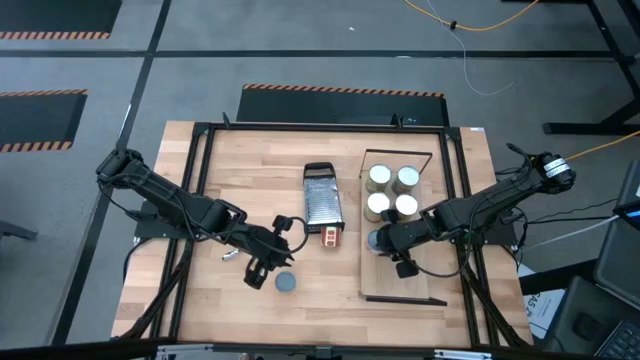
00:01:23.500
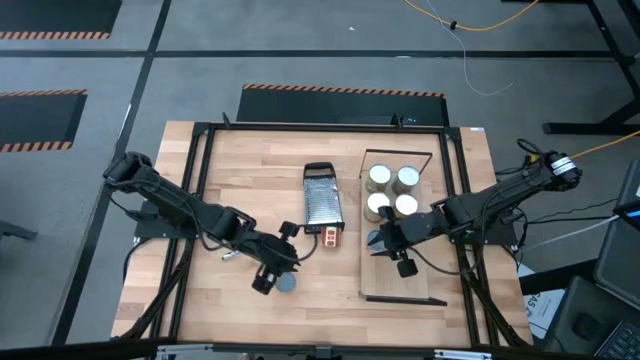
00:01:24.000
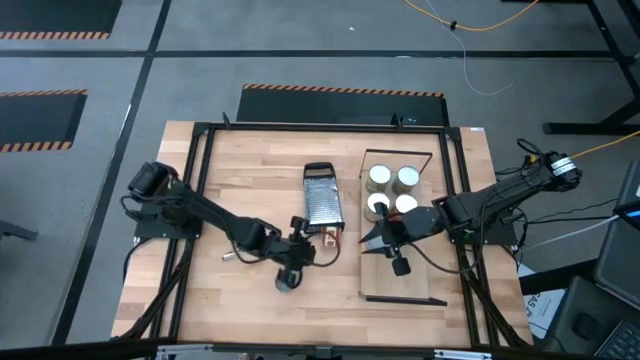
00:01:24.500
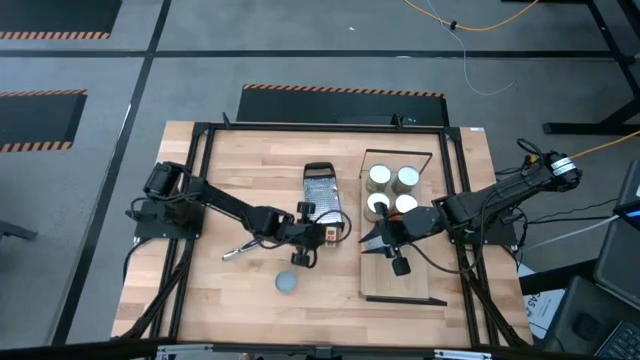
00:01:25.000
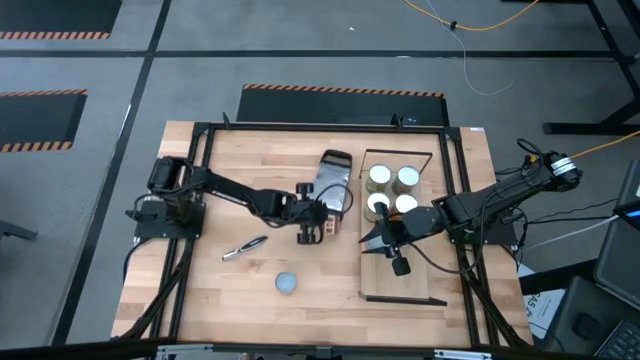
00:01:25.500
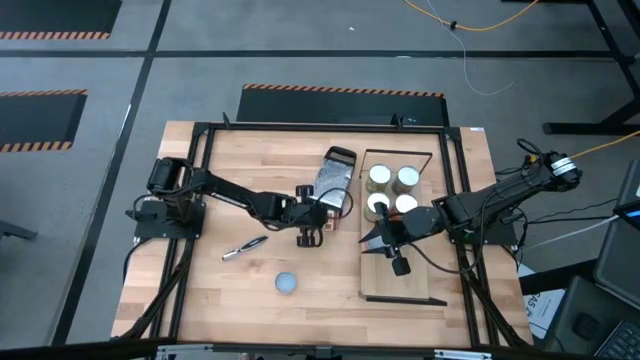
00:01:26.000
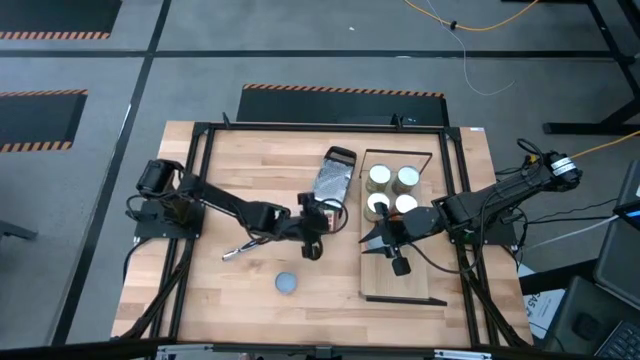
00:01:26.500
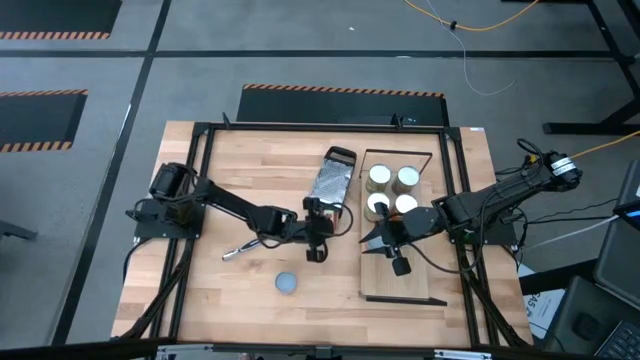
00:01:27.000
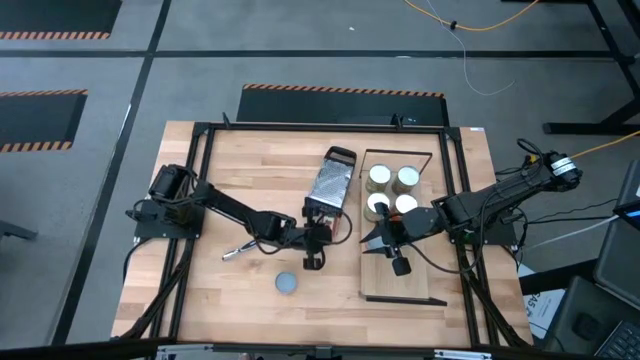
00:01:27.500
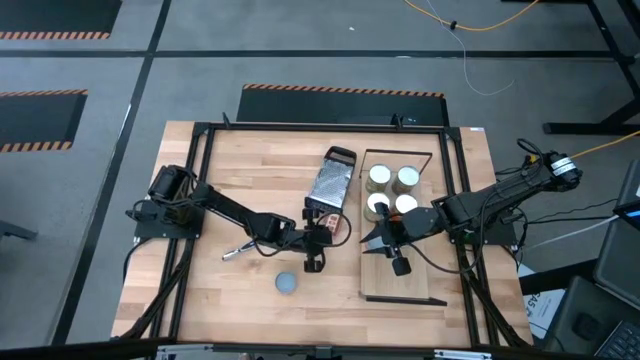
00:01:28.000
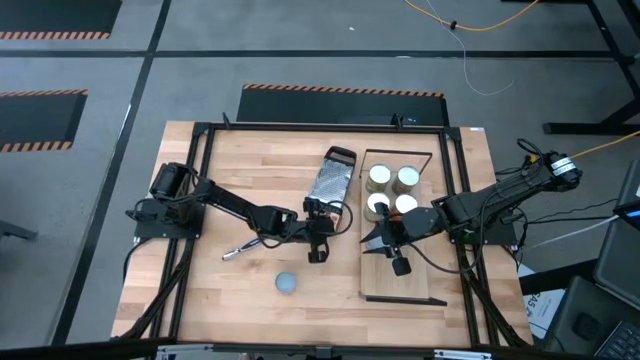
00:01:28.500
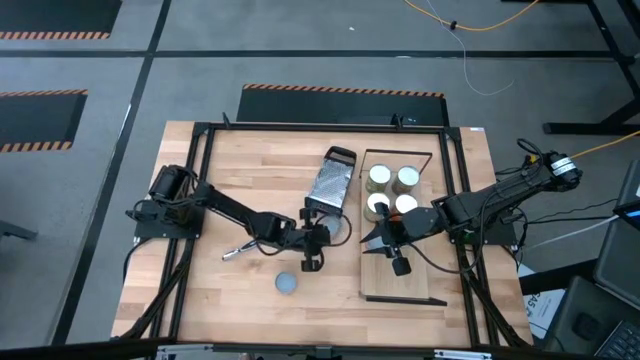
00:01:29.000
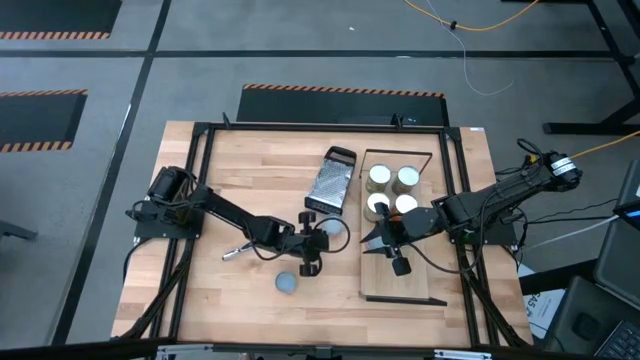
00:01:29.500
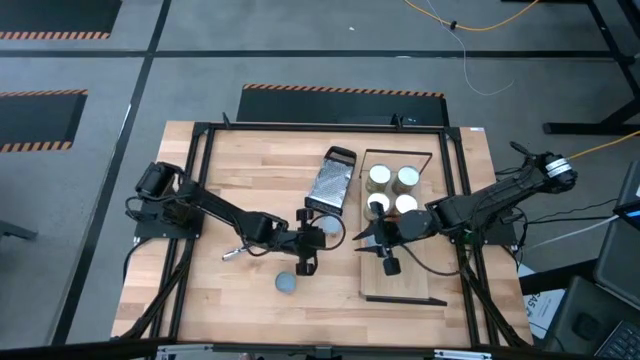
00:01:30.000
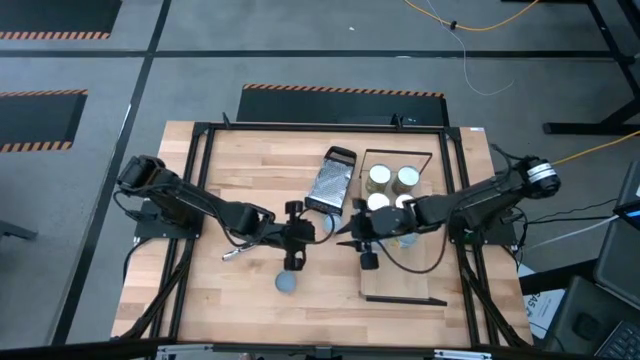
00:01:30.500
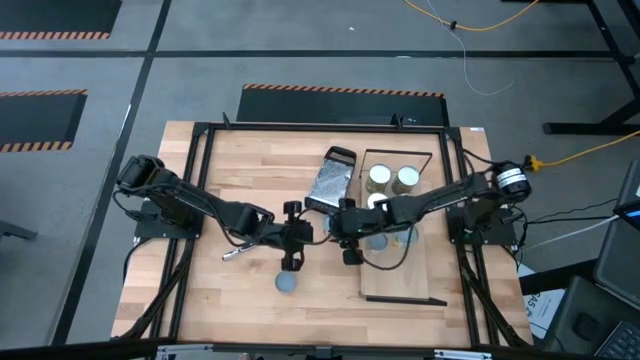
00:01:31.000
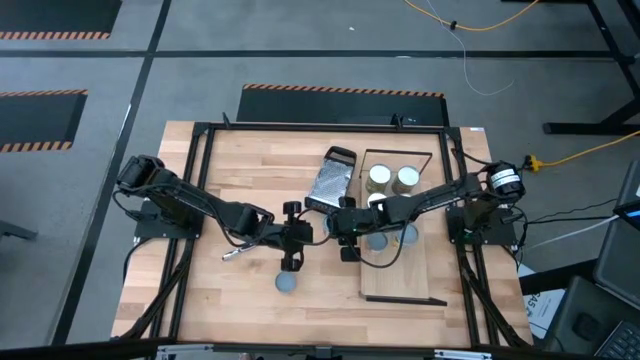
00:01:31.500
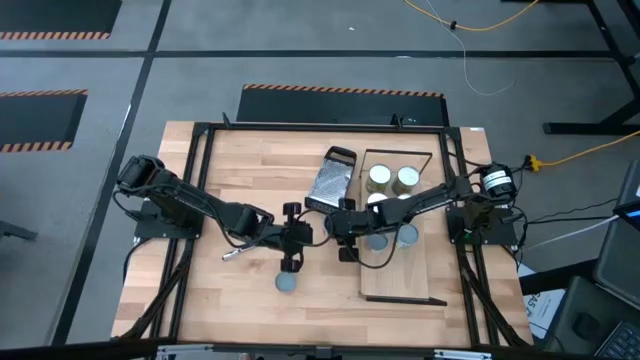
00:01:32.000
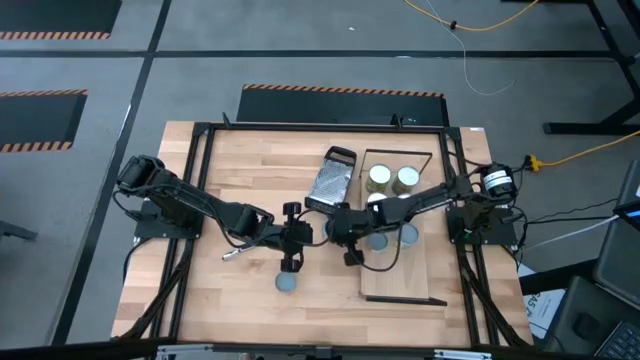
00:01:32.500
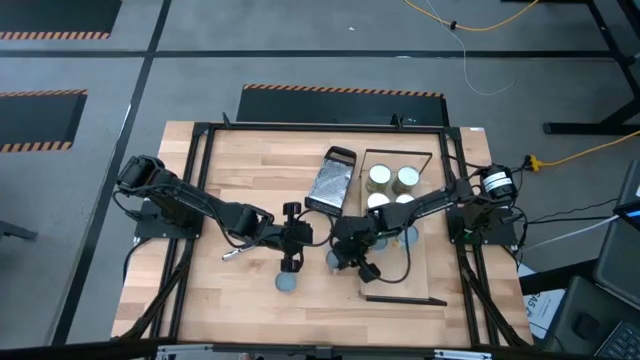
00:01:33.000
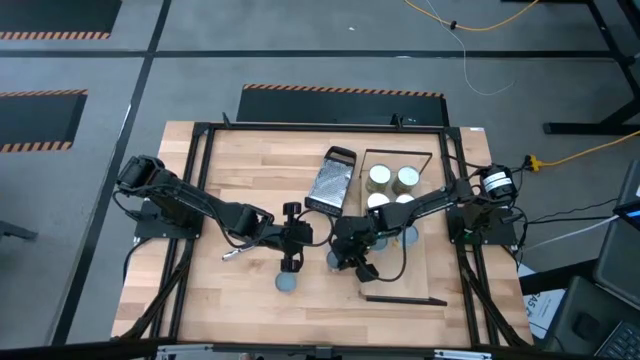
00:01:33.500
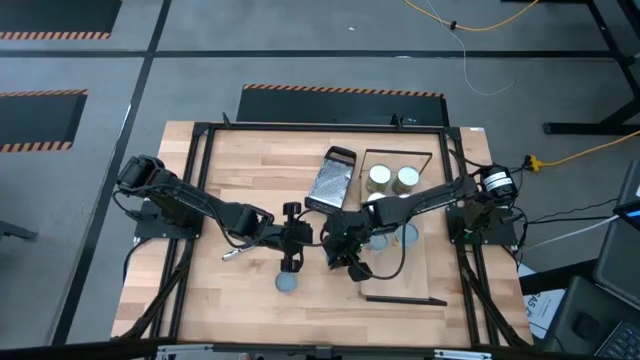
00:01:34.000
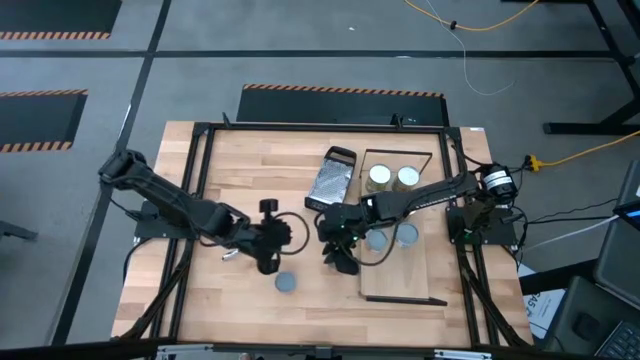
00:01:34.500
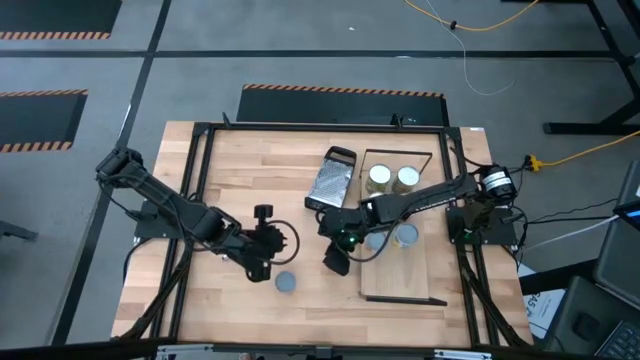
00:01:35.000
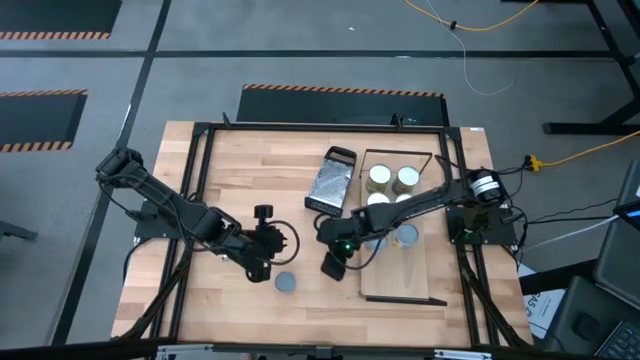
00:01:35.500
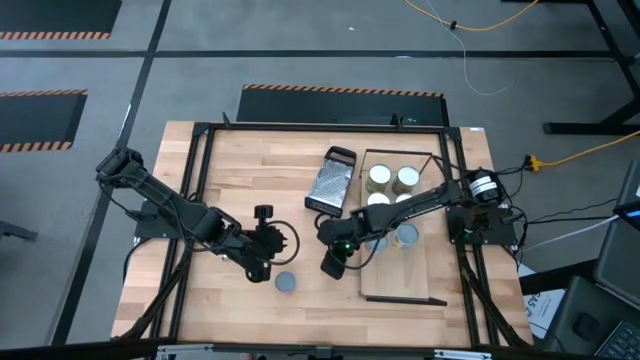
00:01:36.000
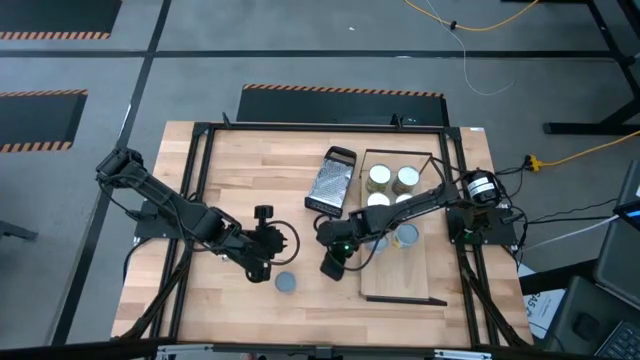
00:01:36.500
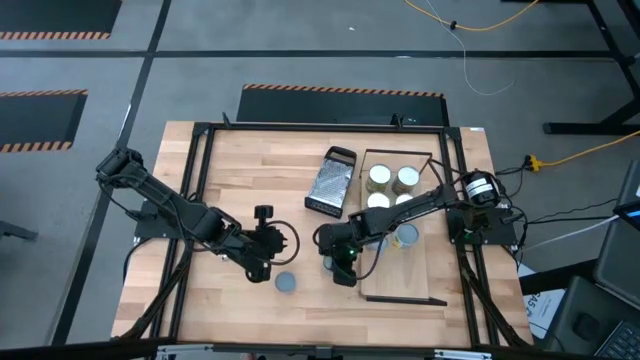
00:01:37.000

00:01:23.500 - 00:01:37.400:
Task: Pick and place cans onto a shelf
Put the canned diced tomatoes on the shelf

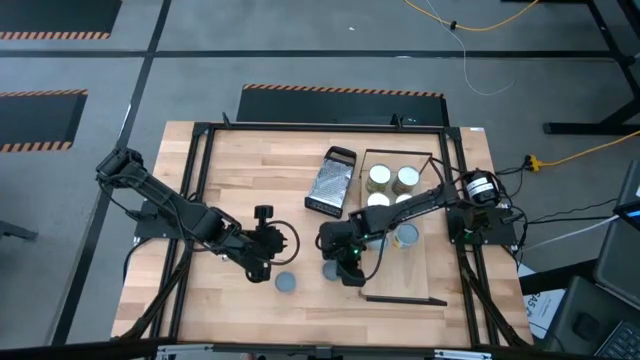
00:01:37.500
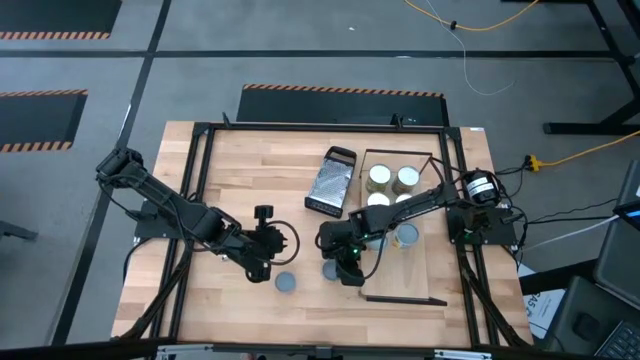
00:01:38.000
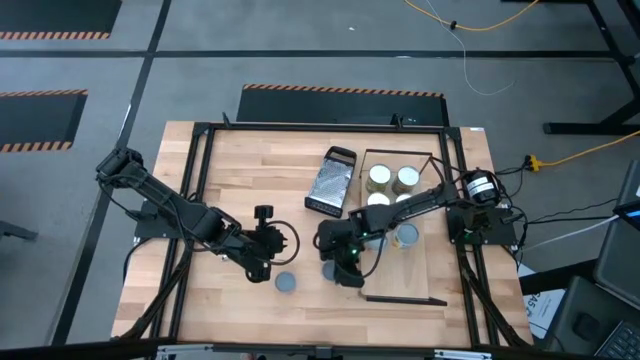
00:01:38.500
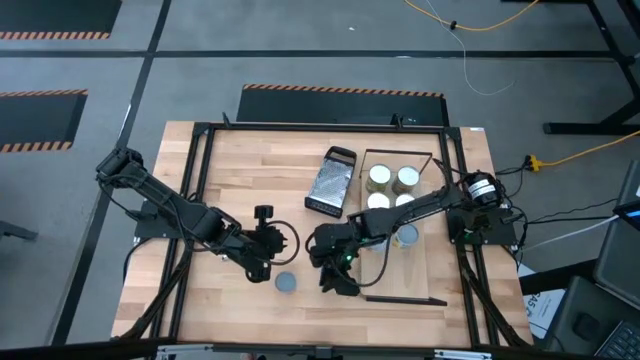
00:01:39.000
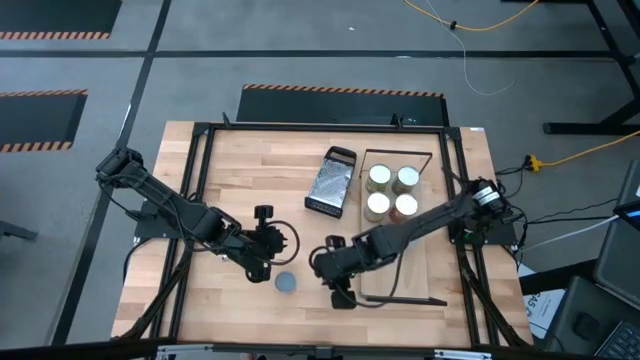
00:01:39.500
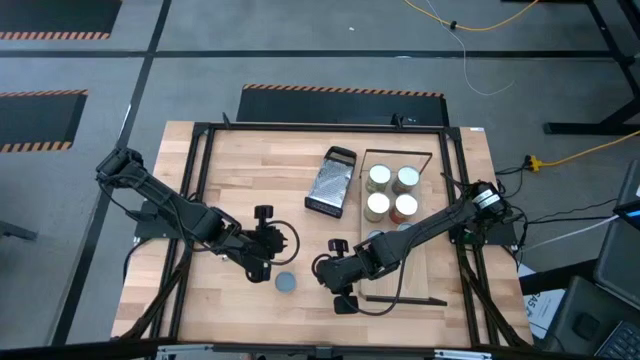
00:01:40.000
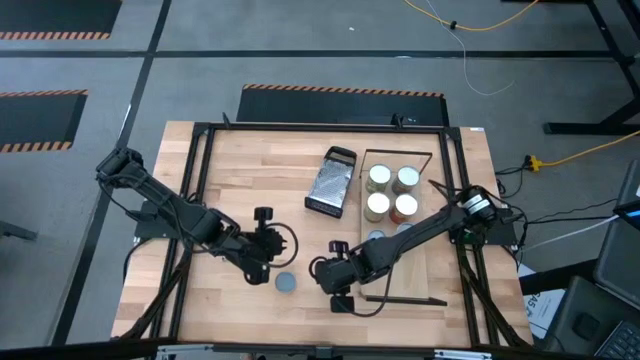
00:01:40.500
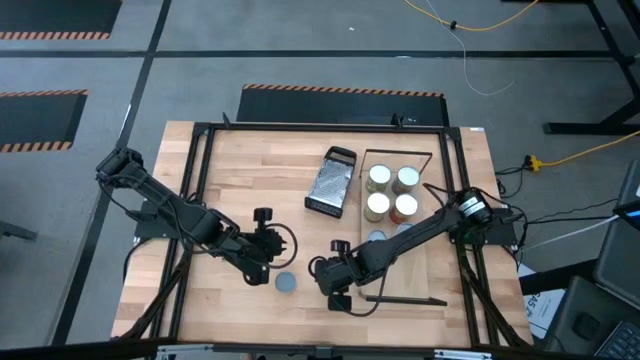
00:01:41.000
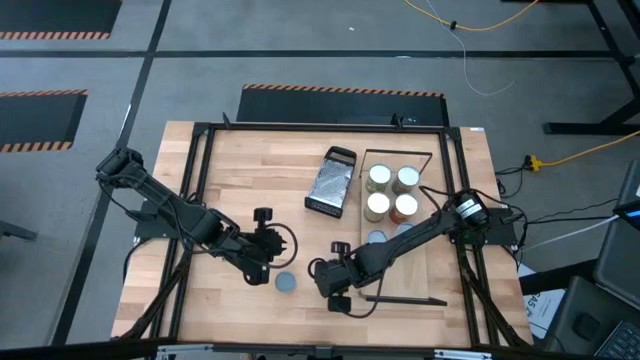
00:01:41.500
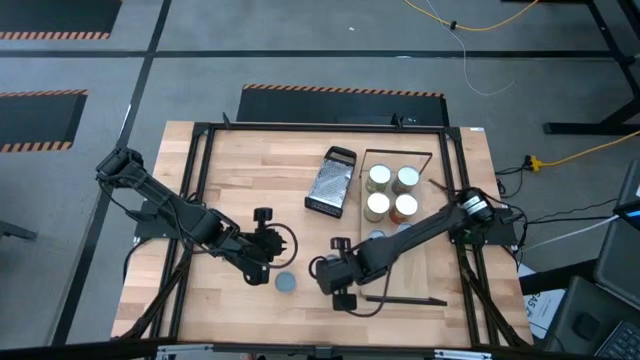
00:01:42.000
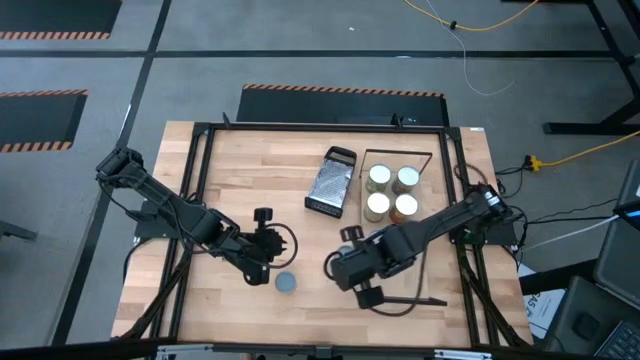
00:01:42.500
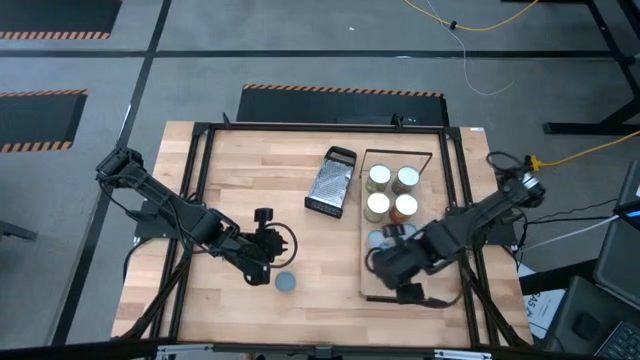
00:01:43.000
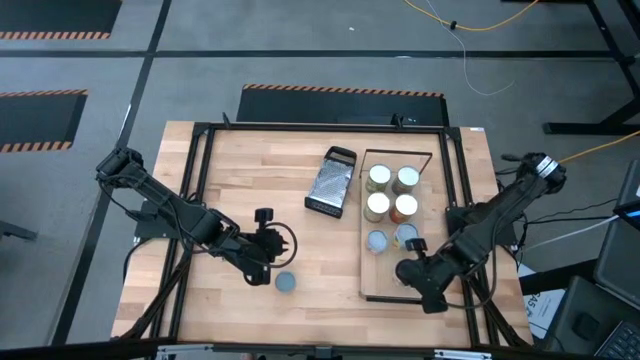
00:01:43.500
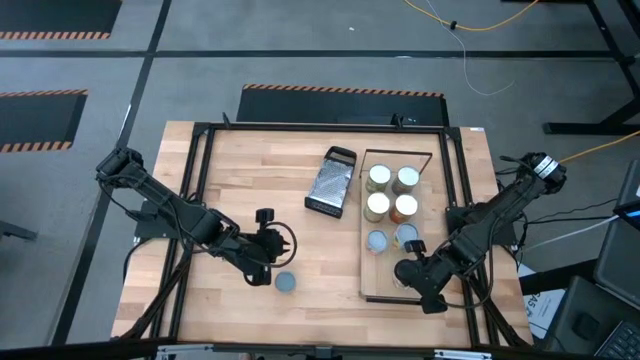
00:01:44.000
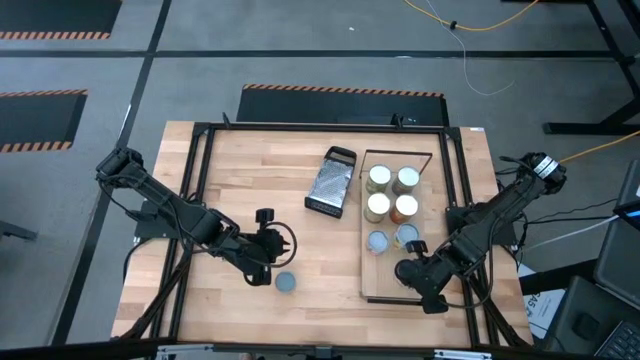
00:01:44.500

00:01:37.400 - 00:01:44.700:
Put the canned diced tomatoes on the shelf
